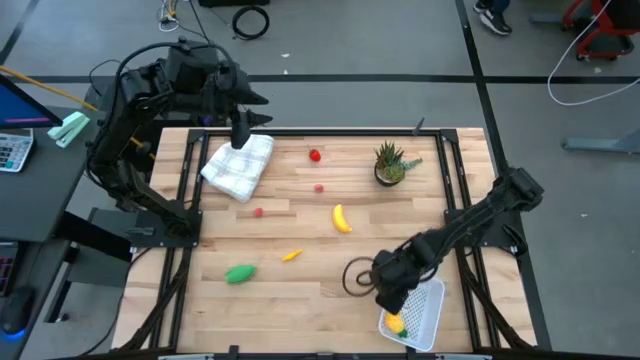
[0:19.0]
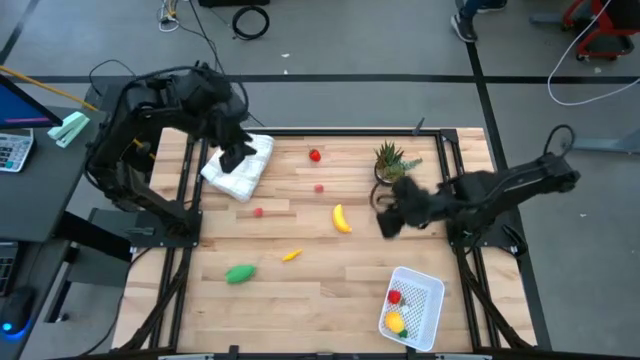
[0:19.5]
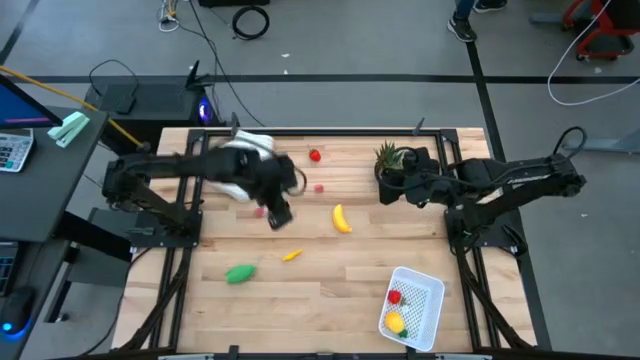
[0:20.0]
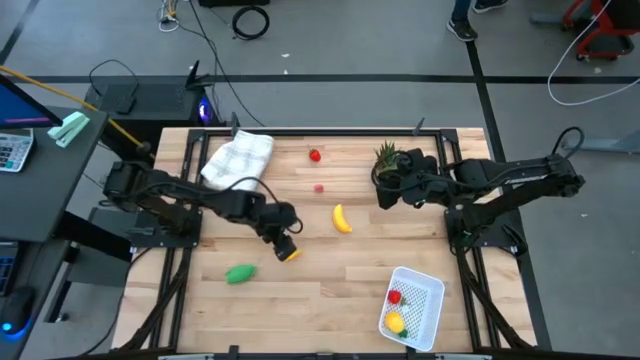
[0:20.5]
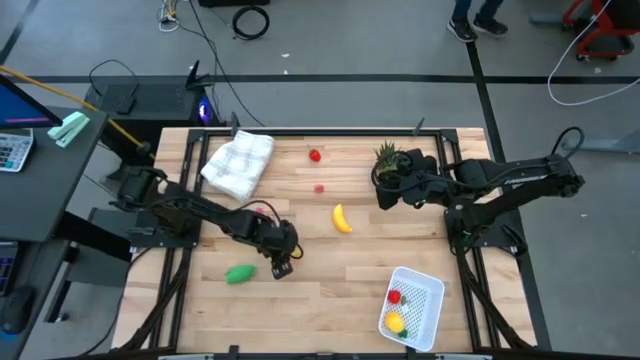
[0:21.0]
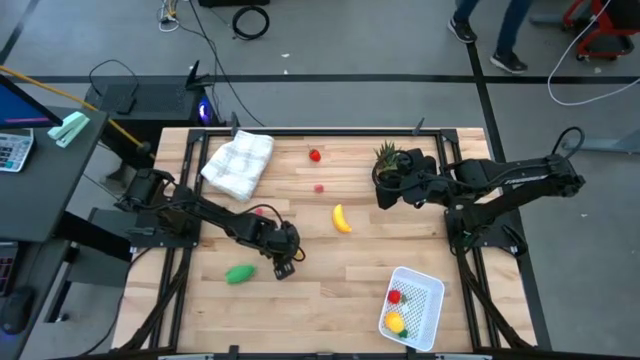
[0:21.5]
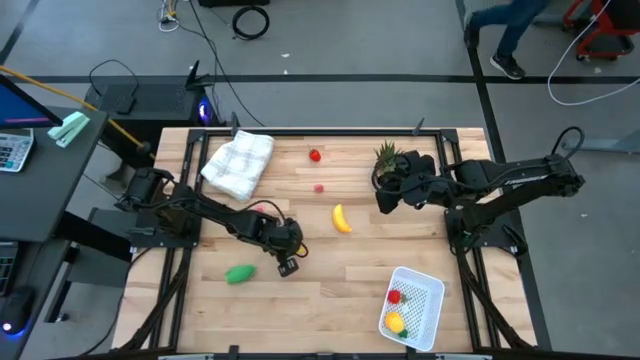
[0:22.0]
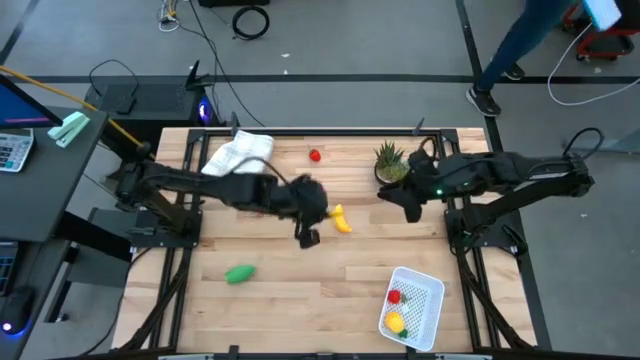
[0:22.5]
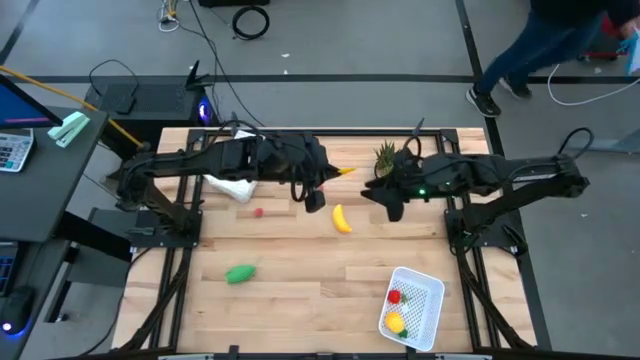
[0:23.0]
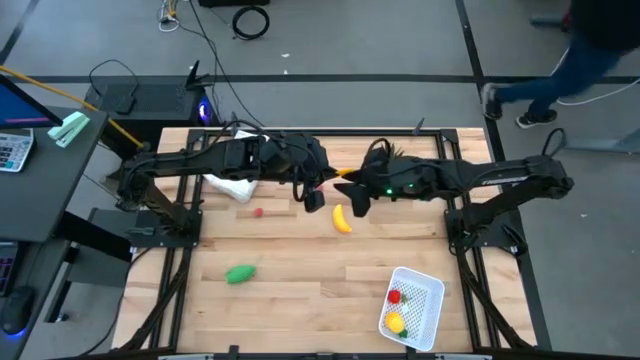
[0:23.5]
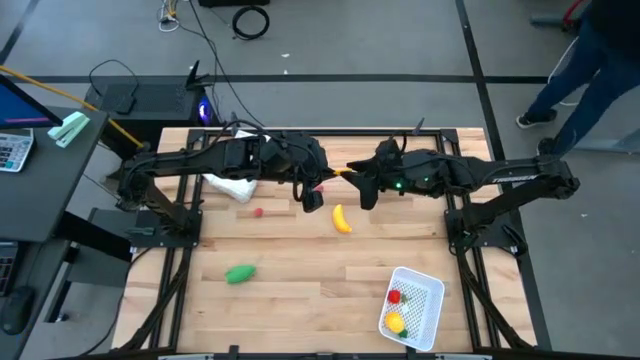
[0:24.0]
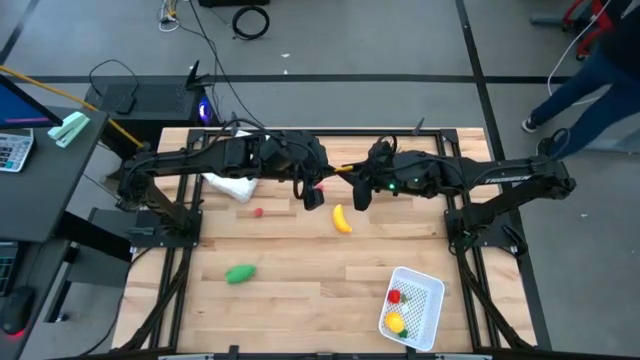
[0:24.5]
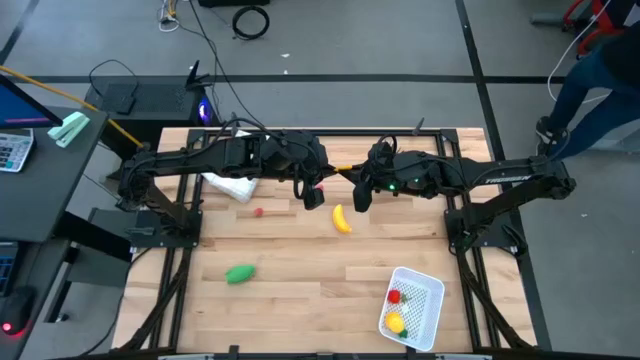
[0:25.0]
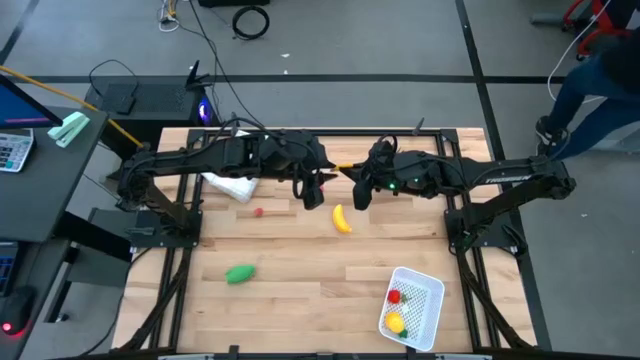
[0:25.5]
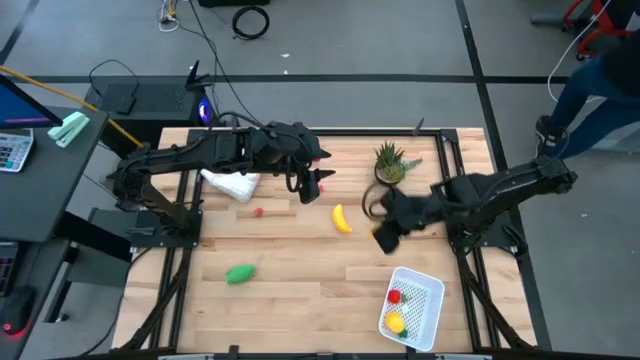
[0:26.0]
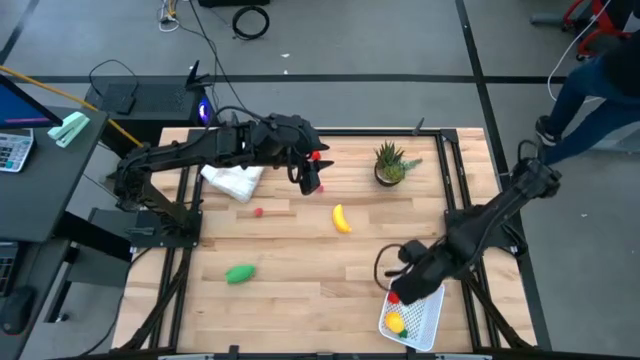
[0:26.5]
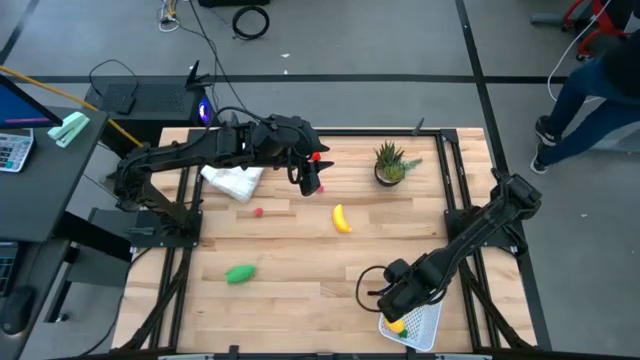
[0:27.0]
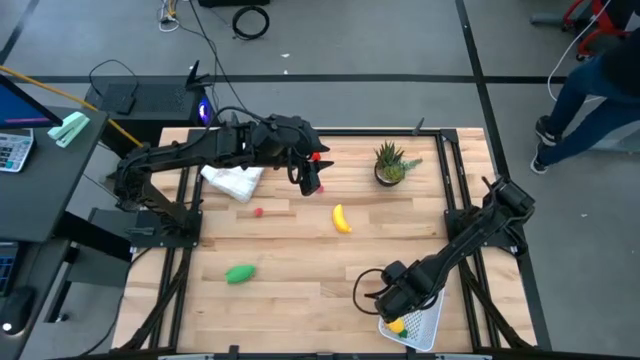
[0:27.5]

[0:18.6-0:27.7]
Task: Pick and placing Produce into tupperware
Put the yellow chili pepper into the white bin

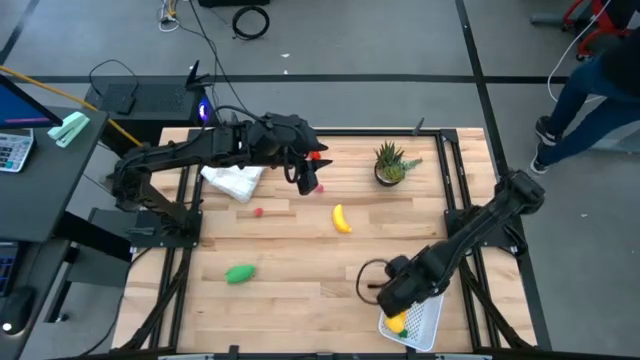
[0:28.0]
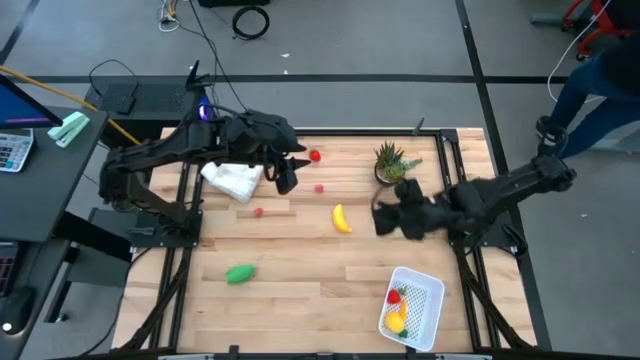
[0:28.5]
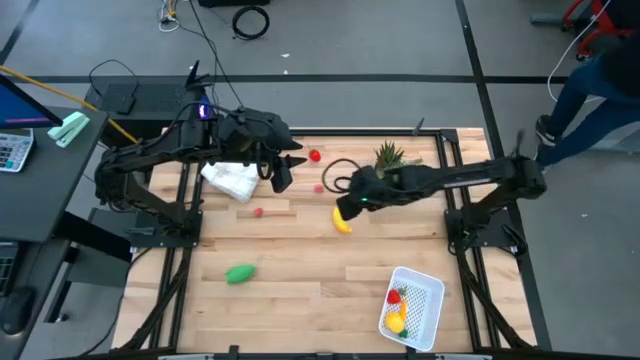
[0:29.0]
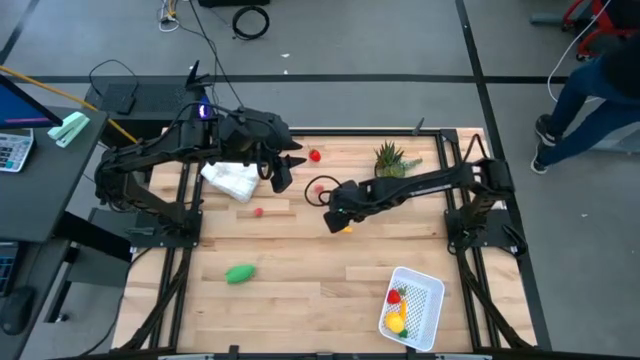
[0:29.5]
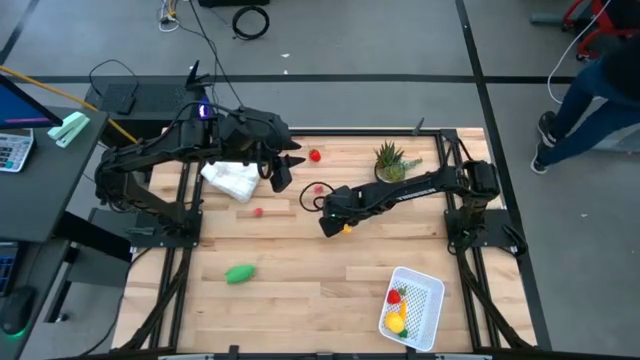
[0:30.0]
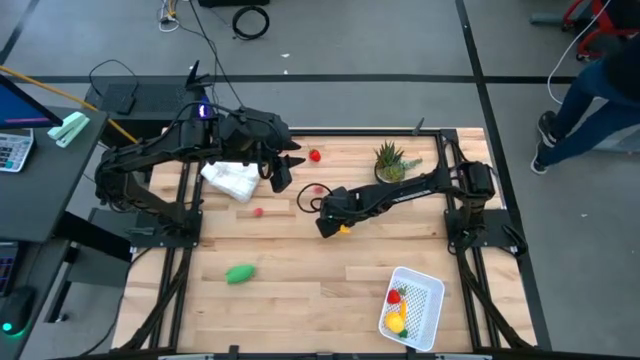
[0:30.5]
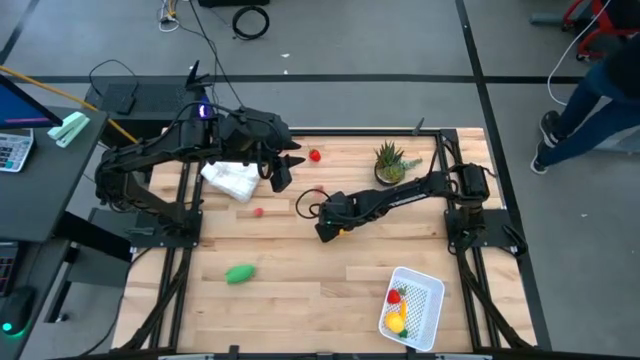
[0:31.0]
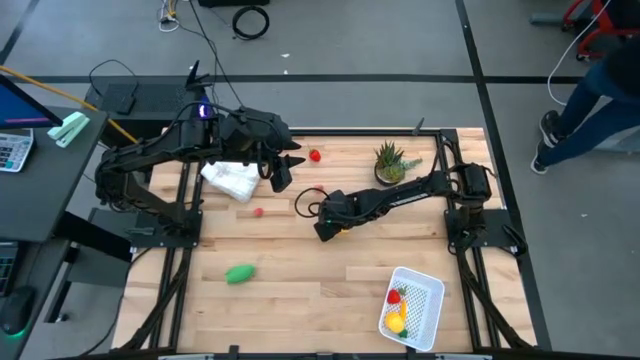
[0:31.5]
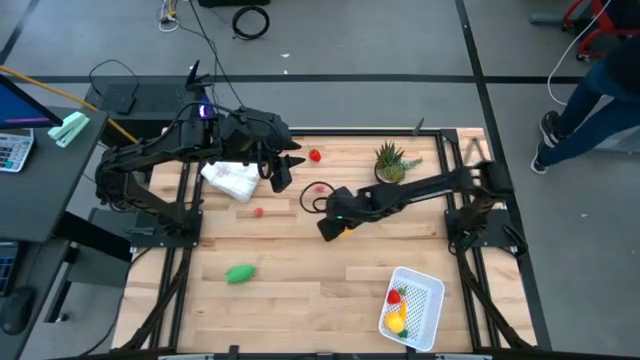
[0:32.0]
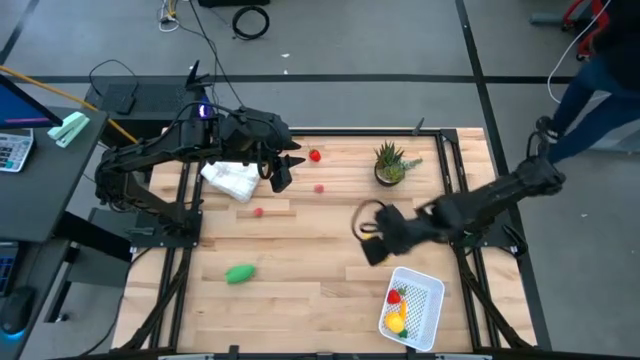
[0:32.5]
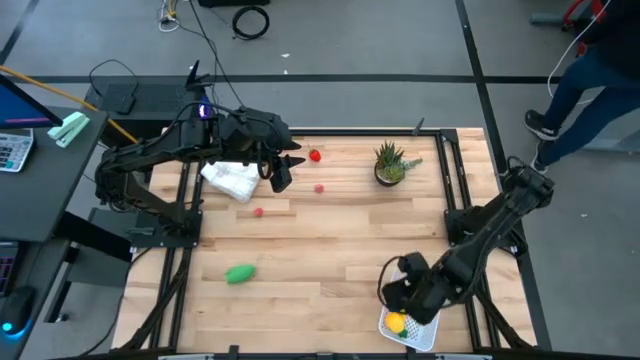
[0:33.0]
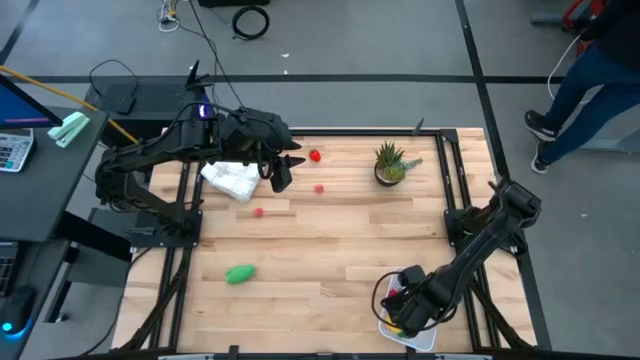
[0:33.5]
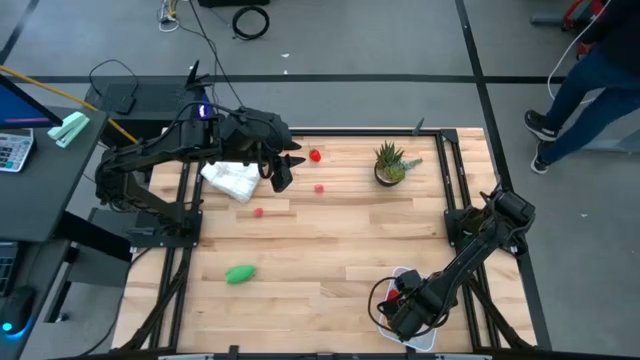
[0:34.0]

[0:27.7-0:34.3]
Put the banana into the white bin

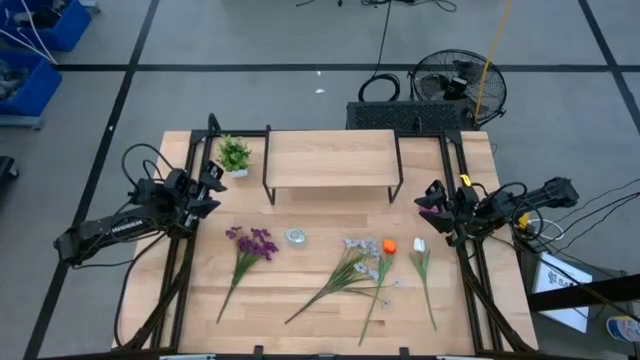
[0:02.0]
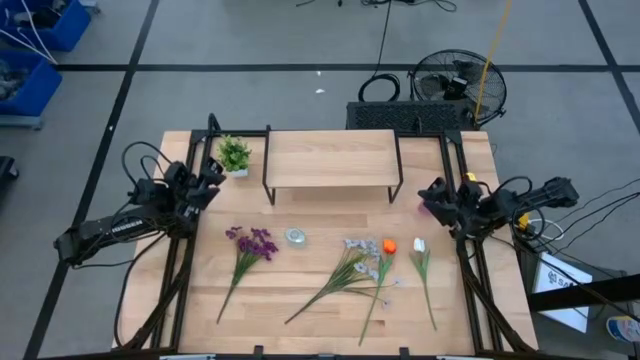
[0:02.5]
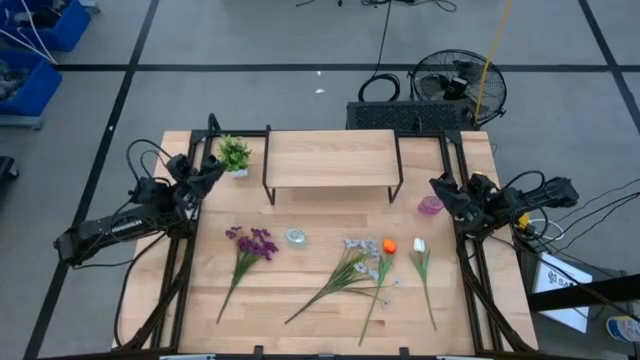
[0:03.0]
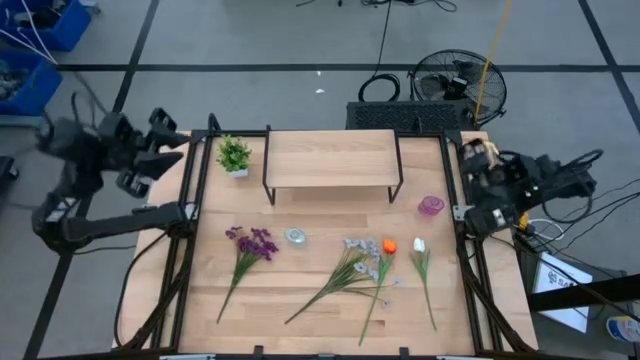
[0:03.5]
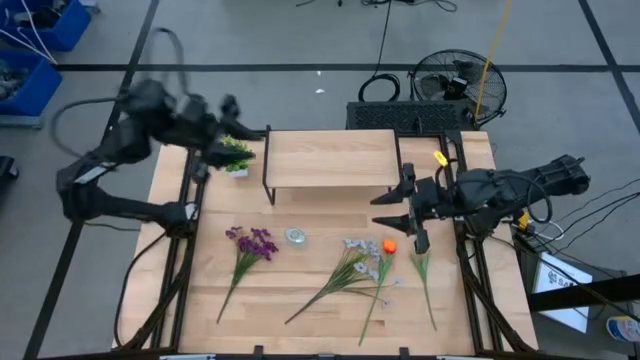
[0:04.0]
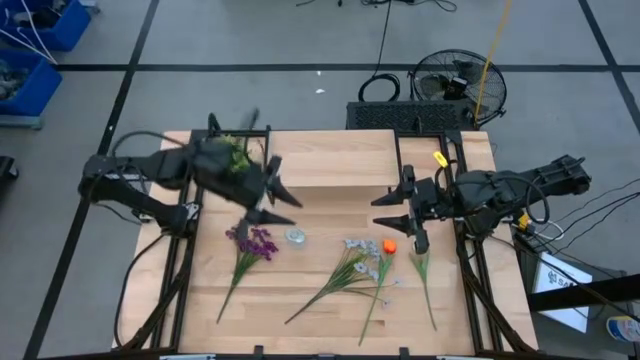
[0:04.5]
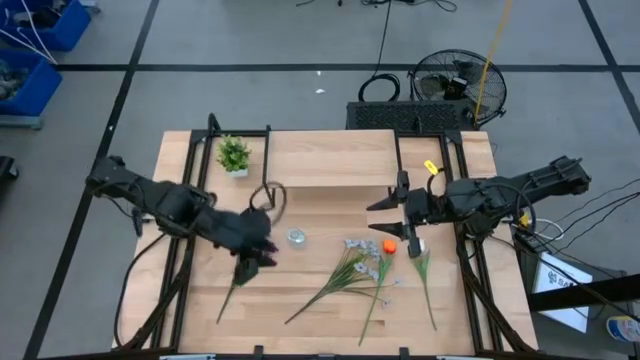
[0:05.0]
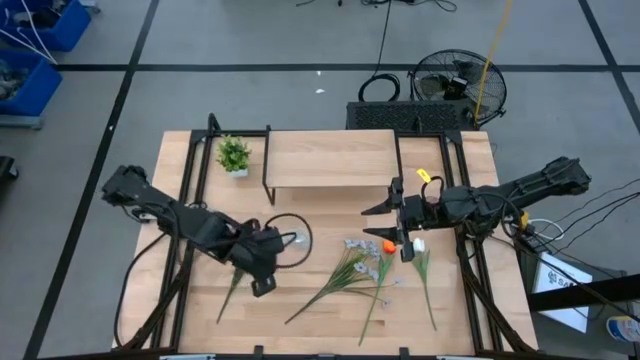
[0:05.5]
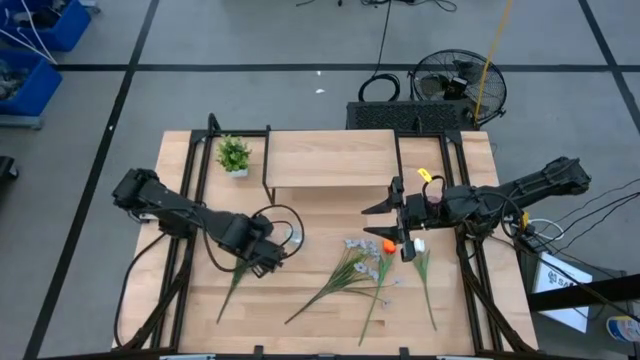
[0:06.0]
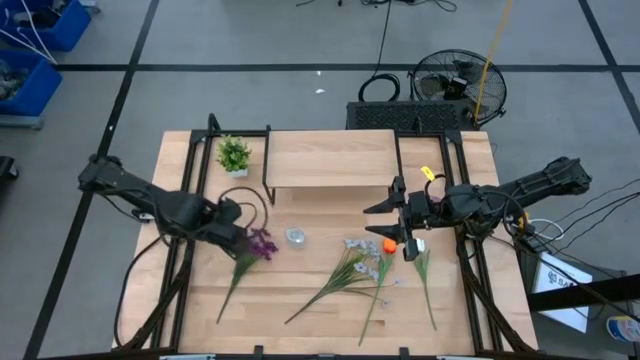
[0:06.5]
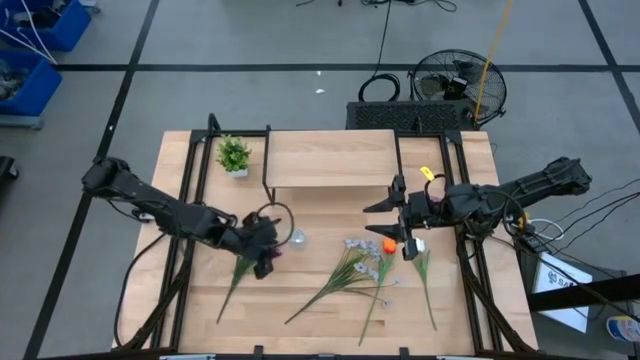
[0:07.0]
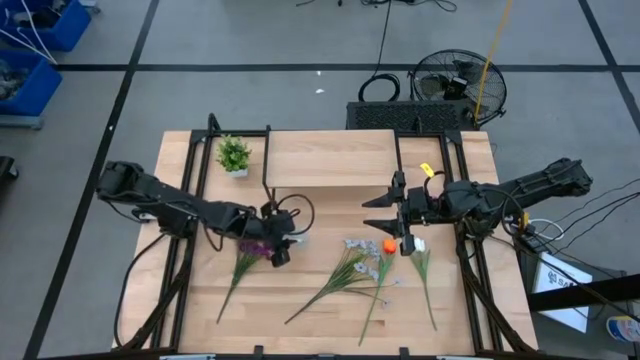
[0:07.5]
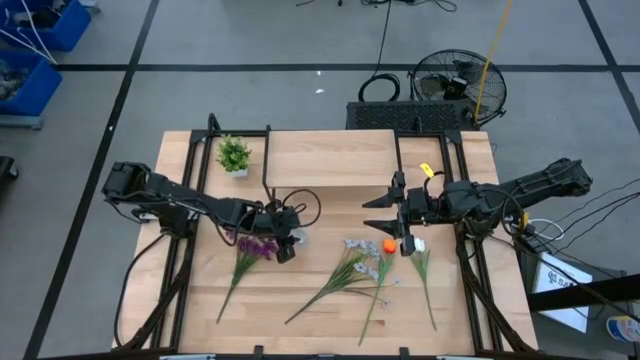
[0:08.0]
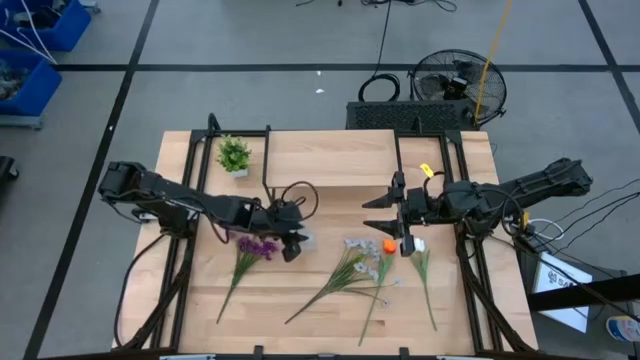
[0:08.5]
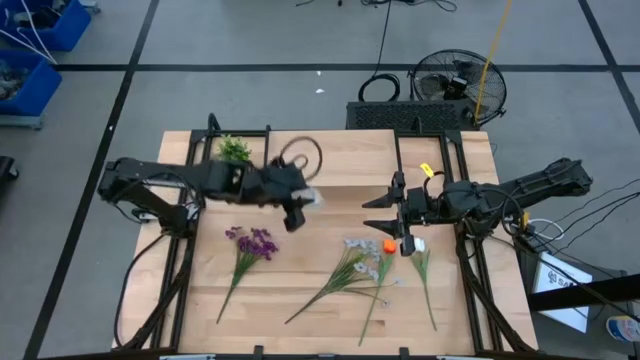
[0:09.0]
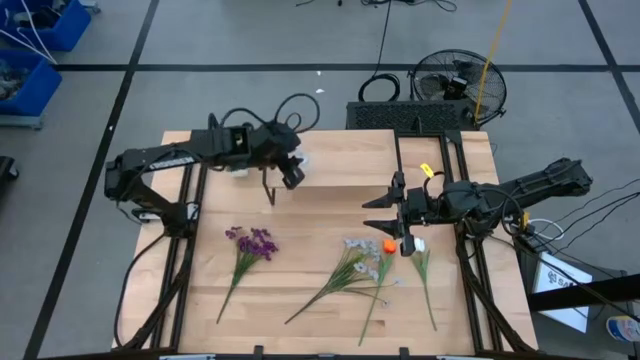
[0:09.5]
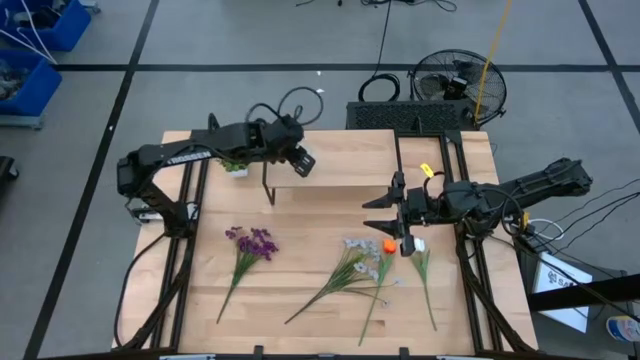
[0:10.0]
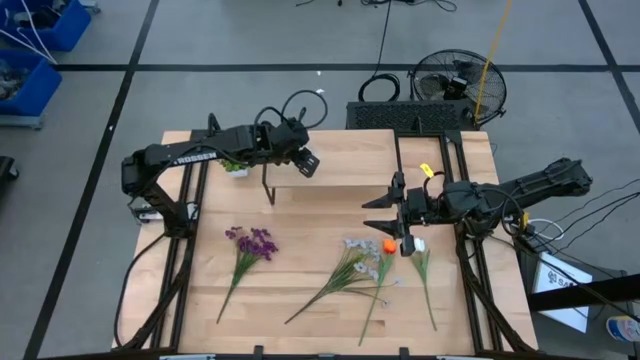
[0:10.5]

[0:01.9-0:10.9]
Task: Pick and place flowers into a vace then onto a shelf
Put the transparent vase on the shelf
